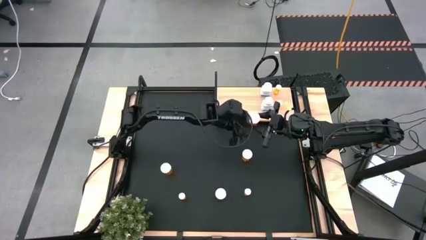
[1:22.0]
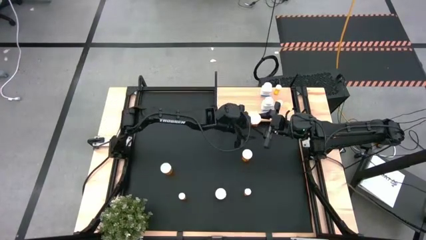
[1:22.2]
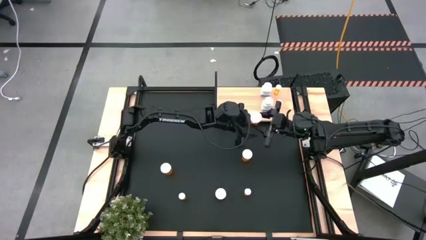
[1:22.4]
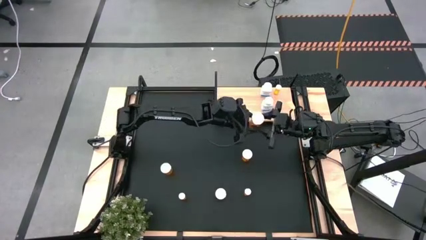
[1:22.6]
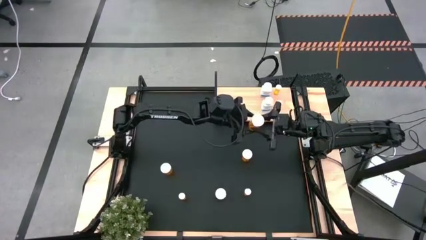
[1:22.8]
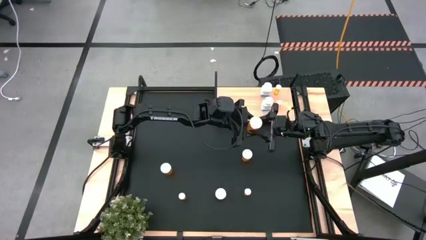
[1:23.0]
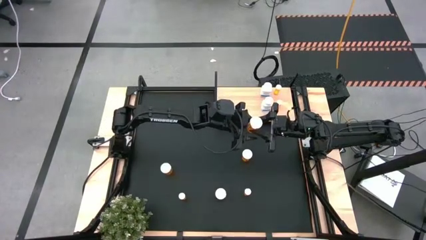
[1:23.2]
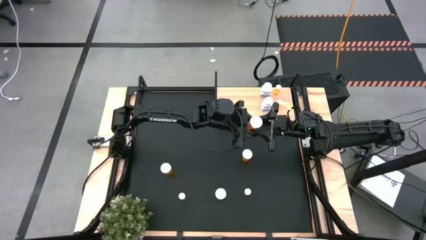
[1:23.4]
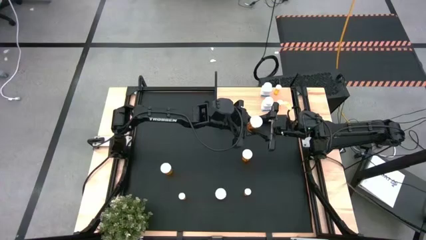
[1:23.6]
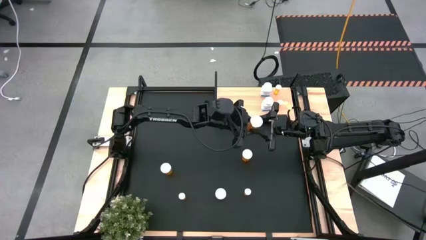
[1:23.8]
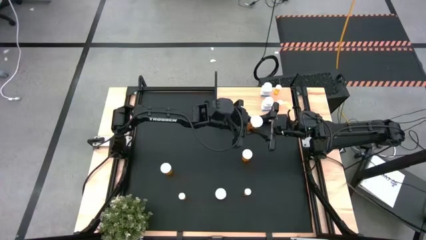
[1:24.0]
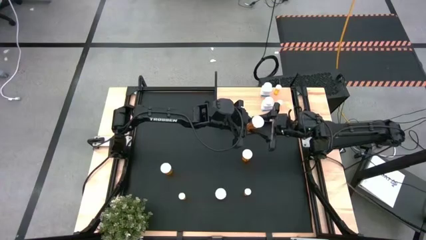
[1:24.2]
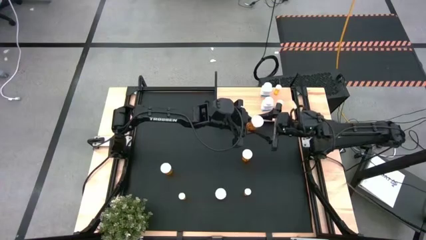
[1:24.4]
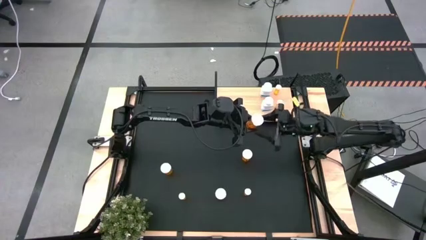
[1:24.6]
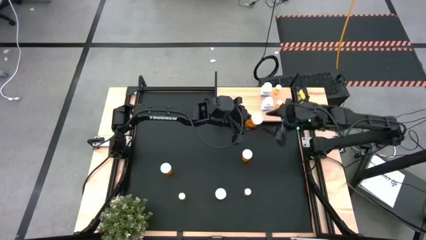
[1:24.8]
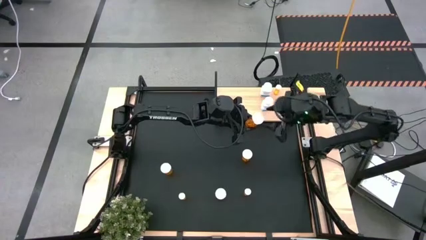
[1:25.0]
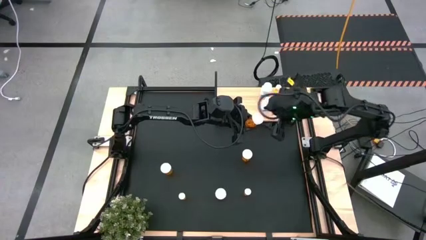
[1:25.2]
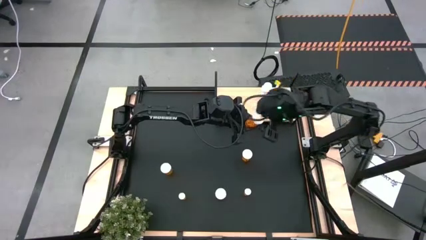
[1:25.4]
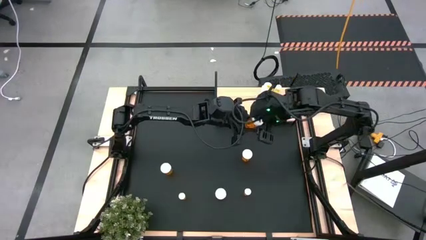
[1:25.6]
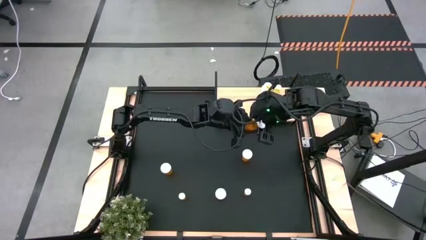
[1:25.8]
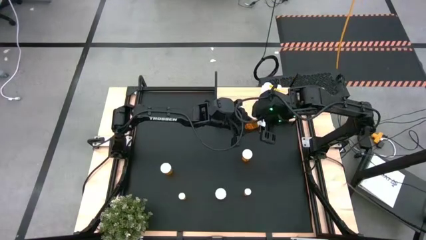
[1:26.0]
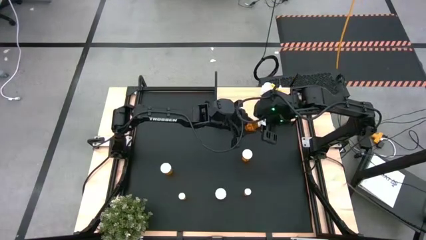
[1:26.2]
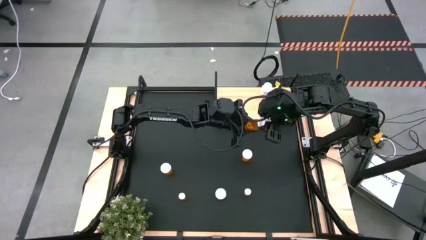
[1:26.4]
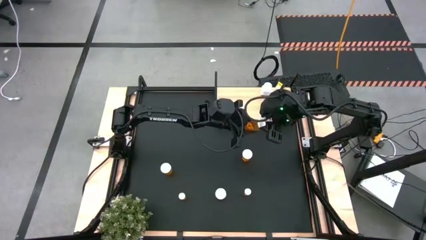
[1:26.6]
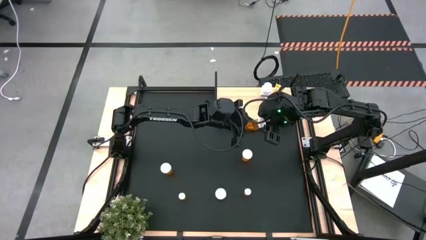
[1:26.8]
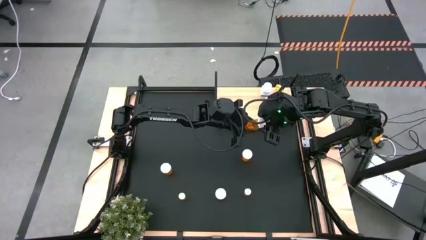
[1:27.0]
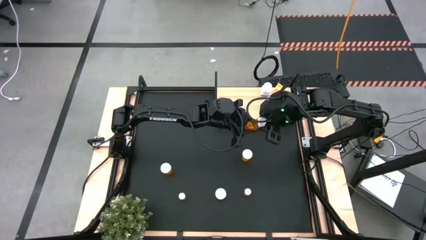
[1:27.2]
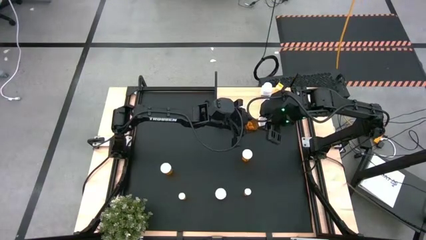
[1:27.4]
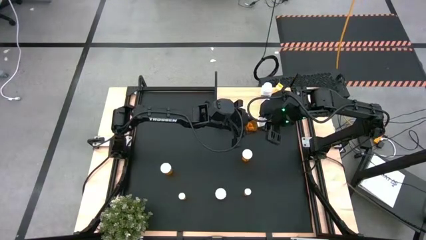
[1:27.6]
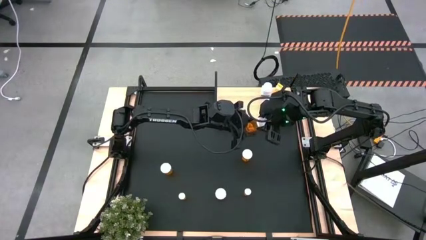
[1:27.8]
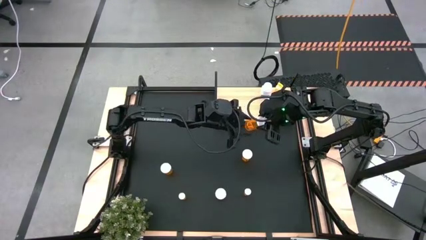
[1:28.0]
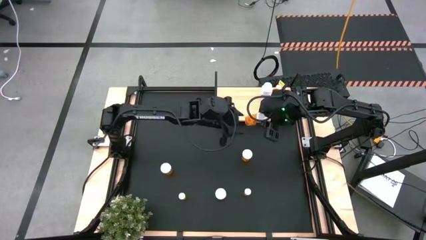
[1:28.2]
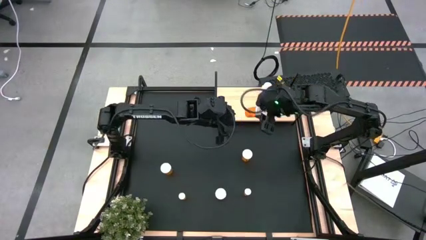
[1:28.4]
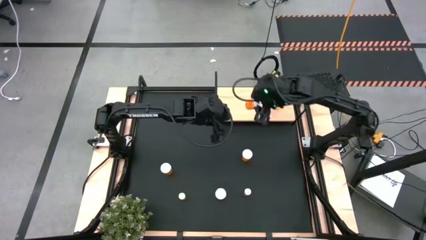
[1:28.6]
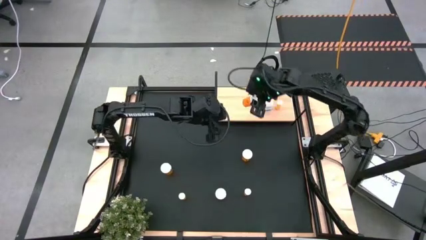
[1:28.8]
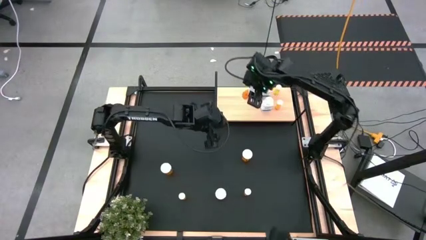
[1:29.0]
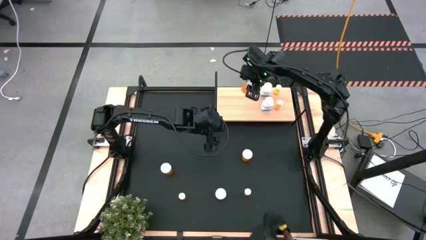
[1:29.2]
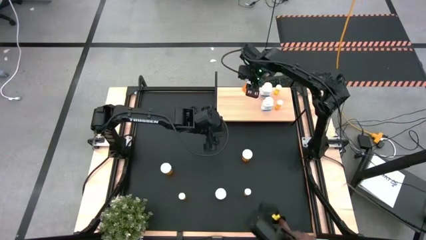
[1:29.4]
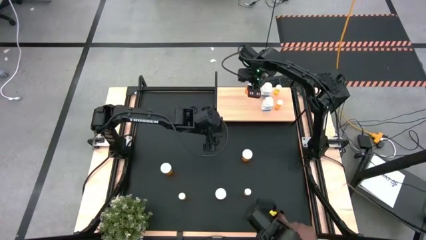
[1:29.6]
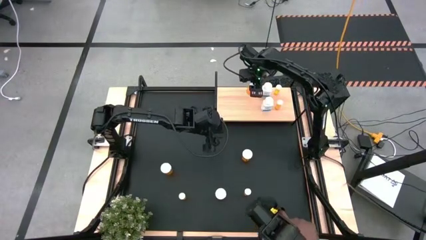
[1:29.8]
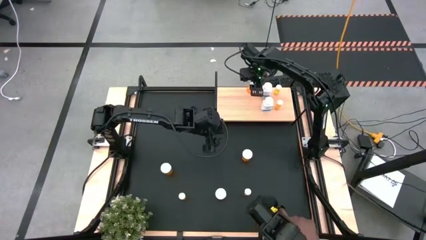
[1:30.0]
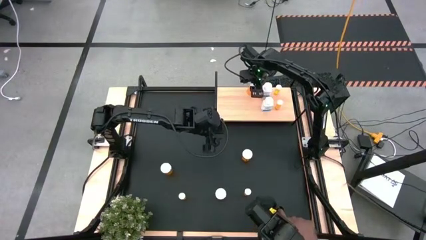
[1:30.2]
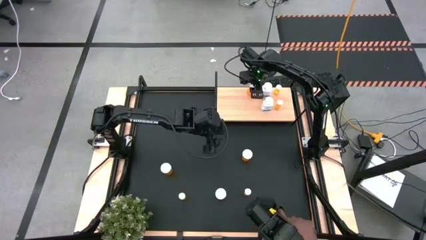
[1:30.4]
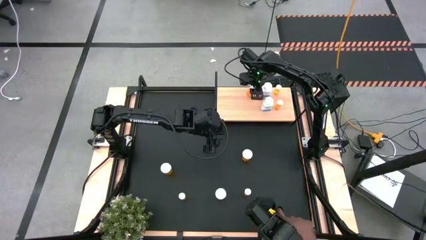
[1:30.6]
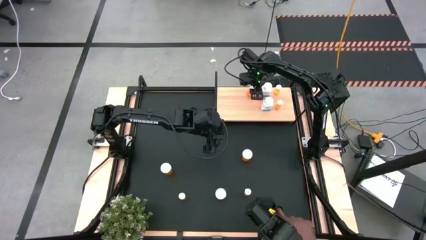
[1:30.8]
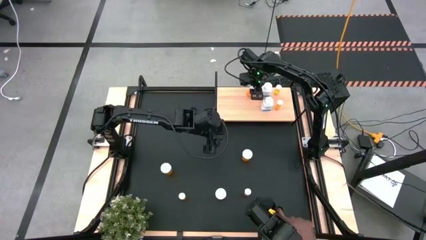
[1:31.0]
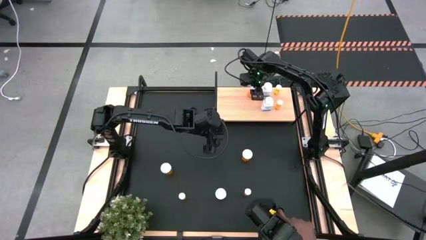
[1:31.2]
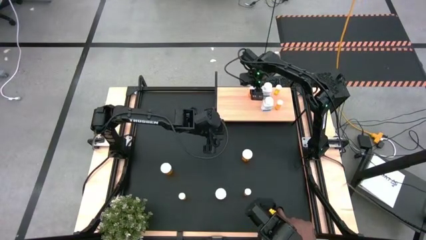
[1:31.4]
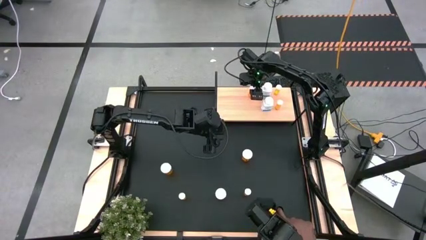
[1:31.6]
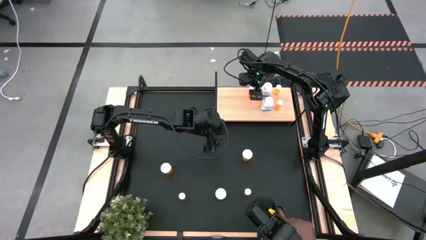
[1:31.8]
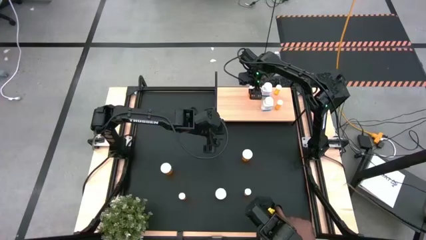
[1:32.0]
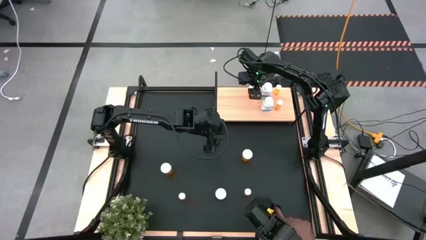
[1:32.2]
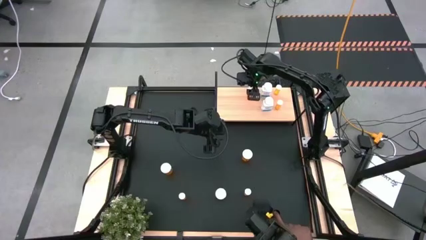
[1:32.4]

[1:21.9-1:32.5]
Task: Pick and place medicine bottles onto shelf by color
Put the large orange pill bottle on the shelf

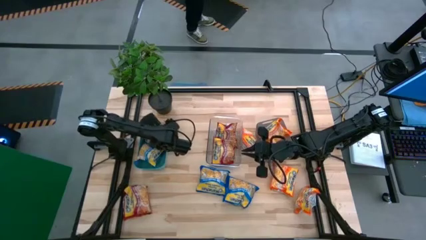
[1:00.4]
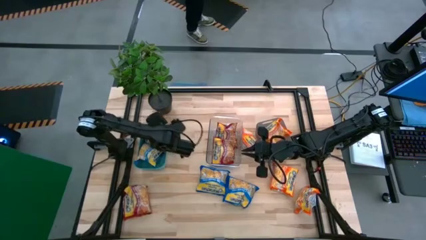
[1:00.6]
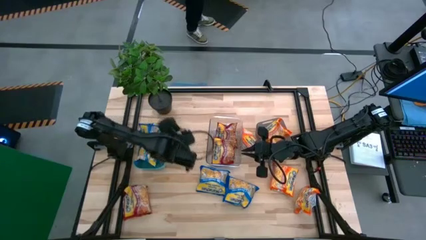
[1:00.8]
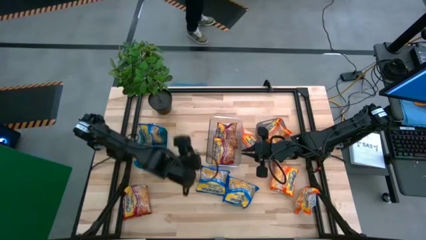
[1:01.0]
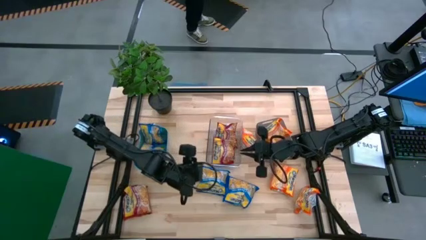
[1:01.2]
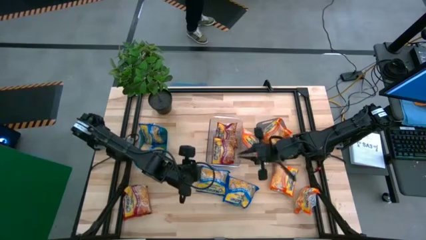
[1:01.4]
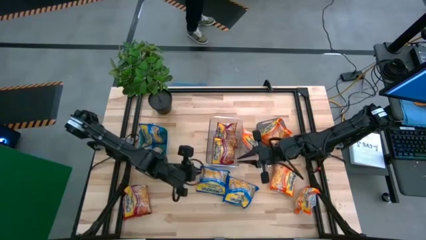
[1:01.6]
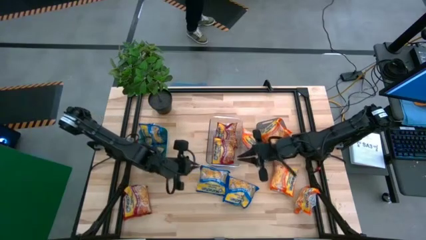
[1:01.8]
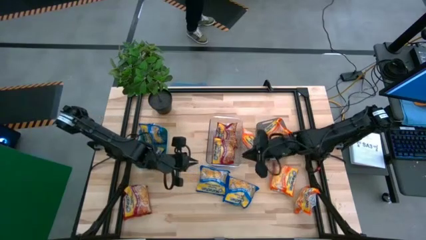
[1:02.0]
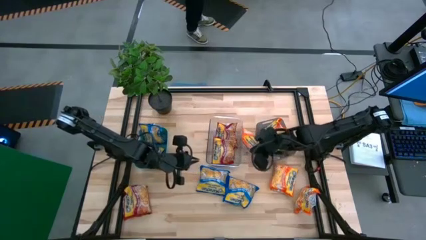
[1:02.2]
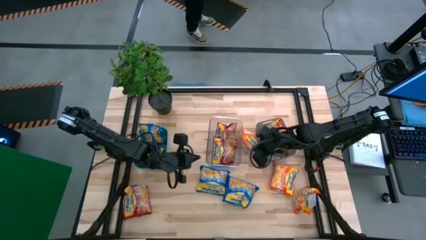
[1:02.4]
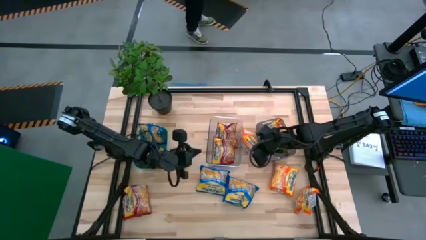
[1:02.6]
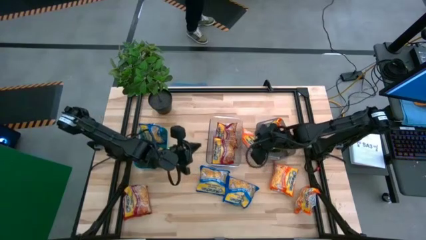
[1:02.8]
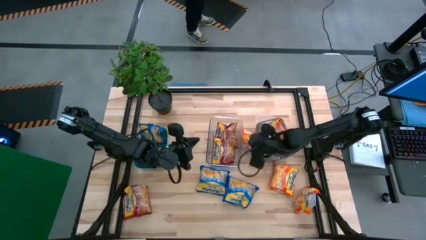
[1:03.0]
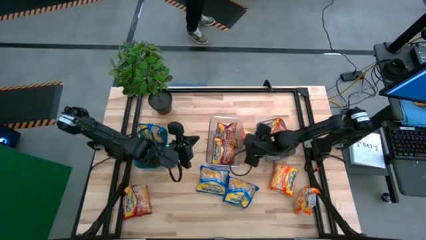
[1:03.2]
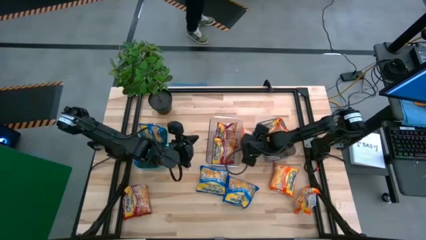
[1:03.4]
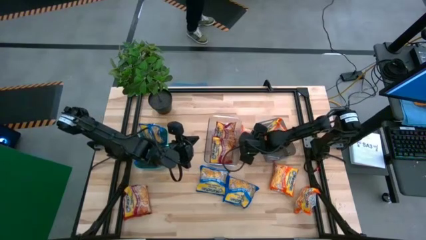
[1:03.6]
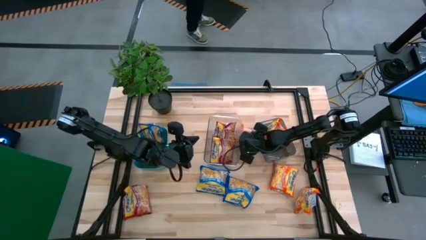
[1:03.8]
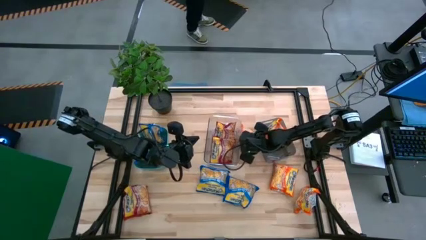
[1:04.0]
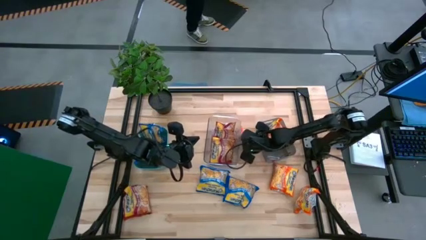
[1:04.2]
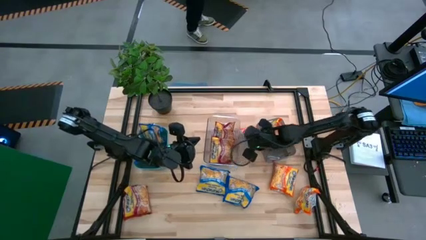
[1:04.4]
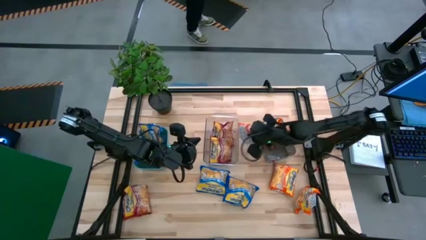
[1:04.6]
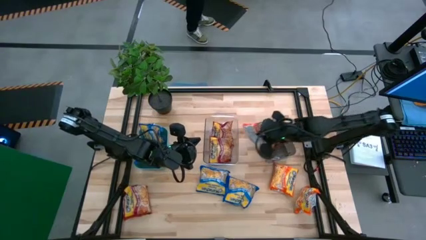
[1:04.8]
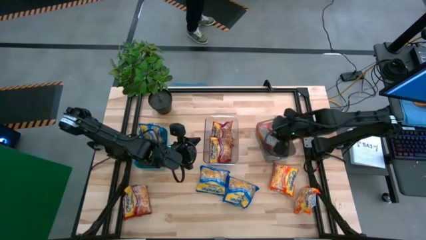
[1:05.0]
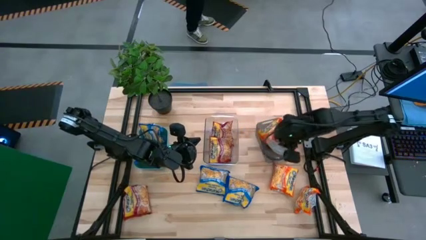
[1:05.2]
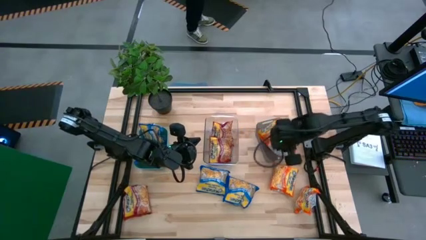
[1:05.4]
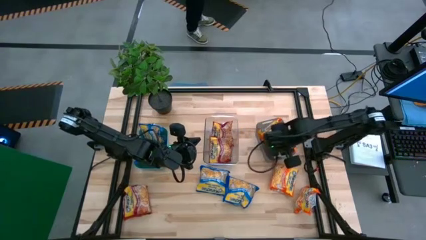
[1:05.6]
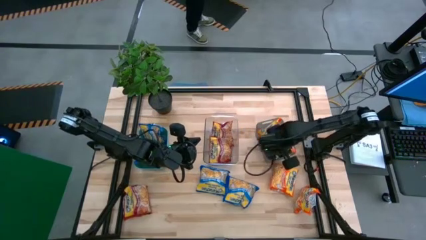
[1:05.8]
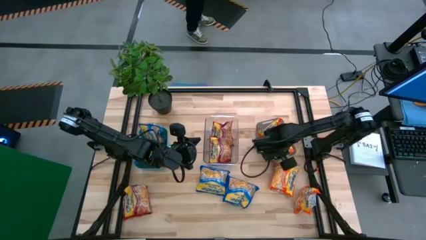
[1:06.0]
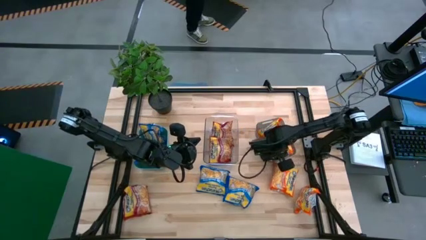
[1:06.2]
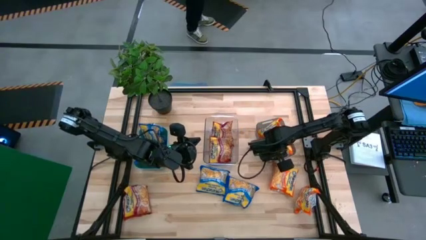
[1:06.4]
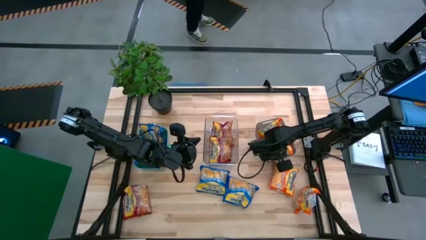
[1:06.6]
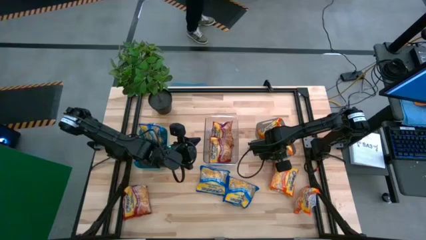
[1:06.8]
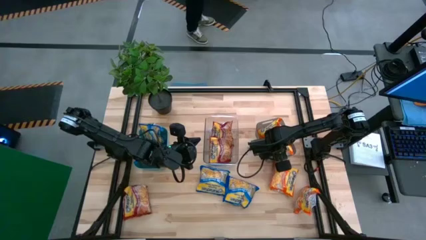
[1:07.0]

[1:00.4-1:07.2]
Task: Sort Maruchan noodles
Put the orange noodle pack into the black bin
